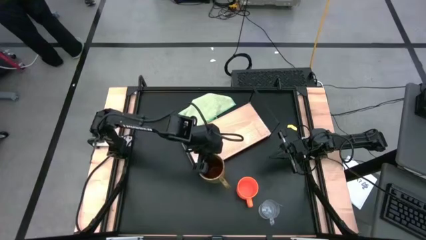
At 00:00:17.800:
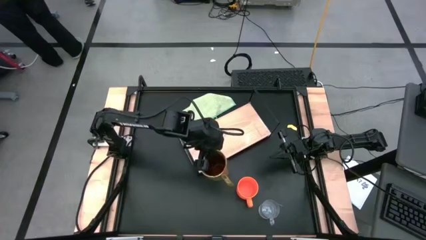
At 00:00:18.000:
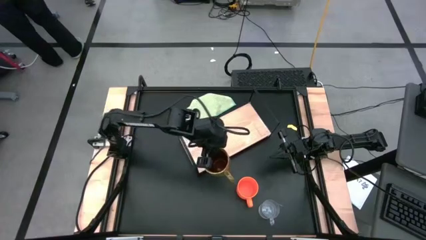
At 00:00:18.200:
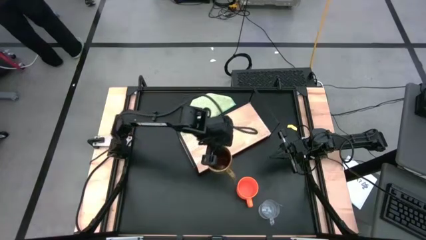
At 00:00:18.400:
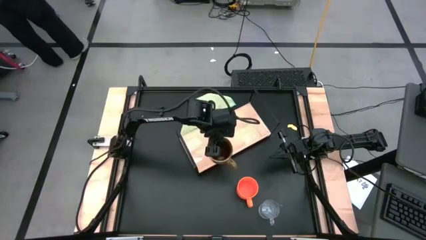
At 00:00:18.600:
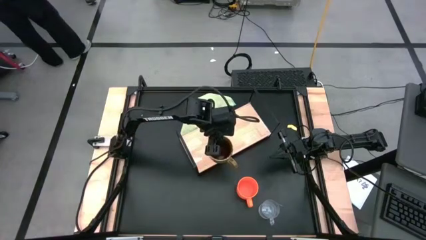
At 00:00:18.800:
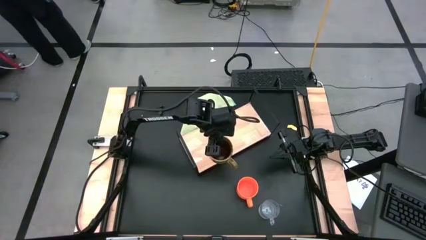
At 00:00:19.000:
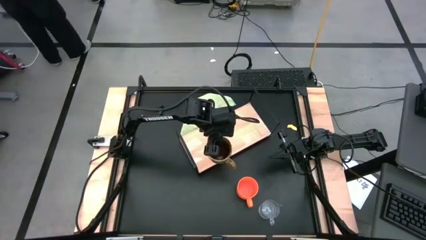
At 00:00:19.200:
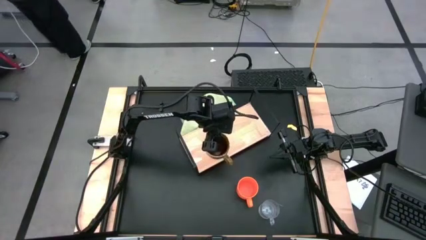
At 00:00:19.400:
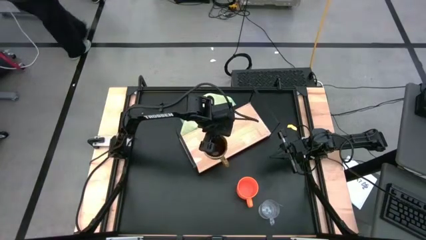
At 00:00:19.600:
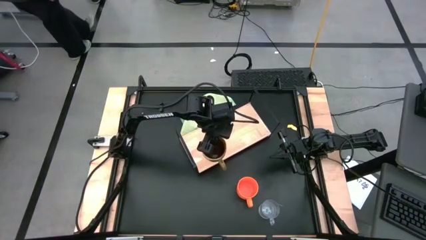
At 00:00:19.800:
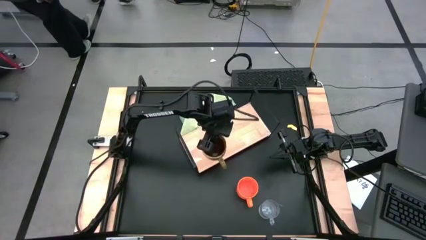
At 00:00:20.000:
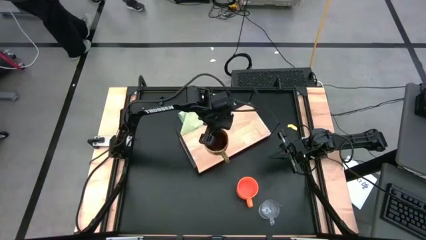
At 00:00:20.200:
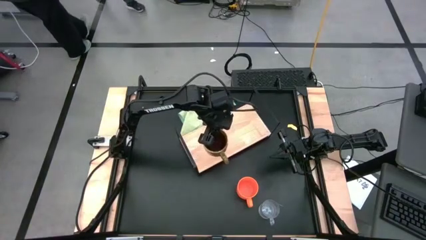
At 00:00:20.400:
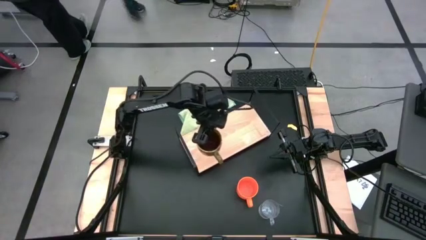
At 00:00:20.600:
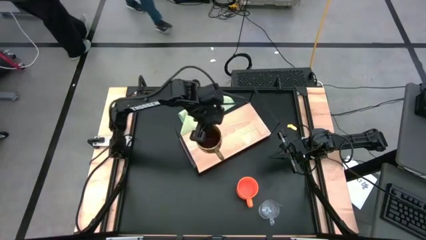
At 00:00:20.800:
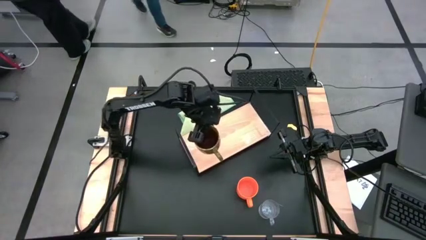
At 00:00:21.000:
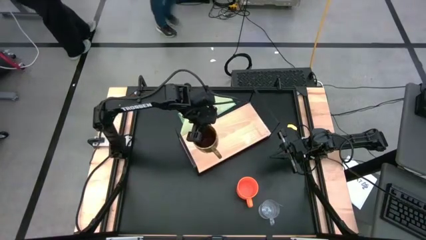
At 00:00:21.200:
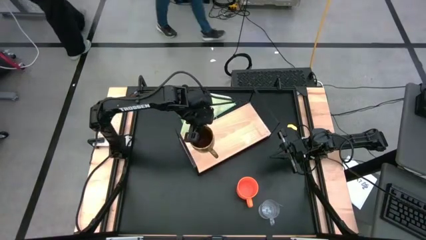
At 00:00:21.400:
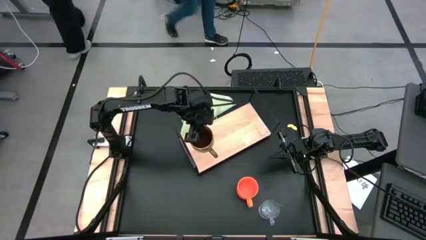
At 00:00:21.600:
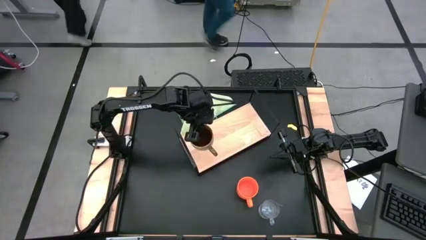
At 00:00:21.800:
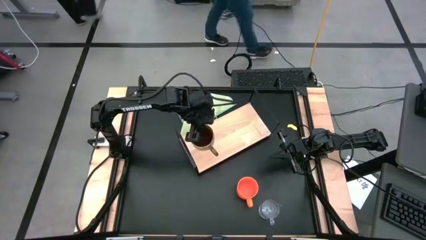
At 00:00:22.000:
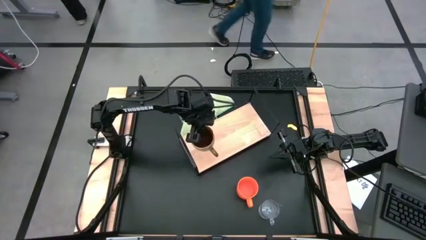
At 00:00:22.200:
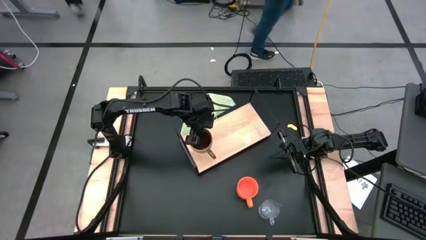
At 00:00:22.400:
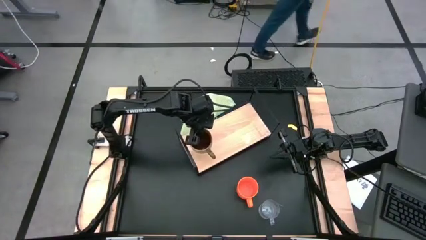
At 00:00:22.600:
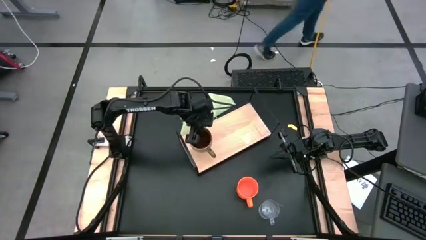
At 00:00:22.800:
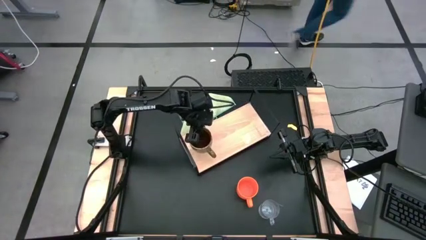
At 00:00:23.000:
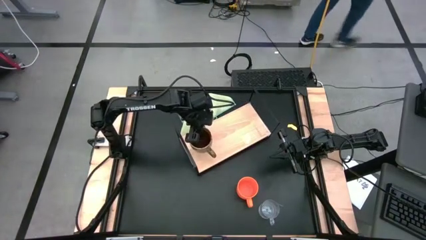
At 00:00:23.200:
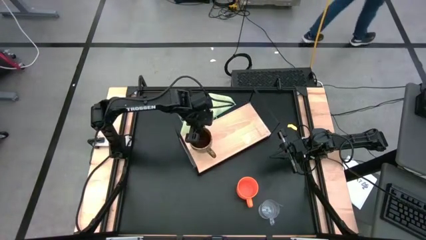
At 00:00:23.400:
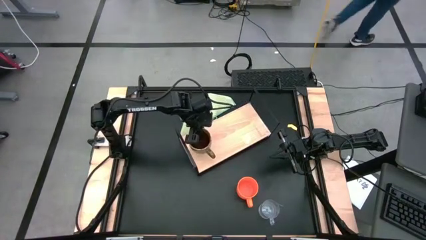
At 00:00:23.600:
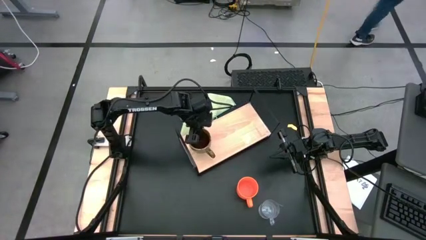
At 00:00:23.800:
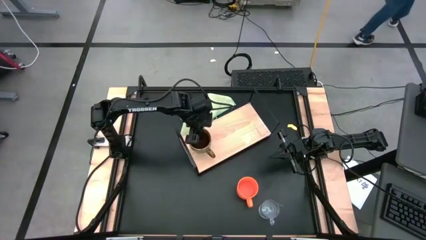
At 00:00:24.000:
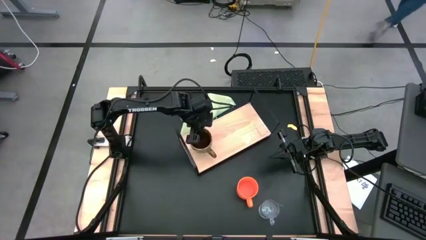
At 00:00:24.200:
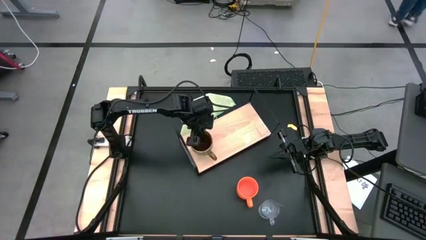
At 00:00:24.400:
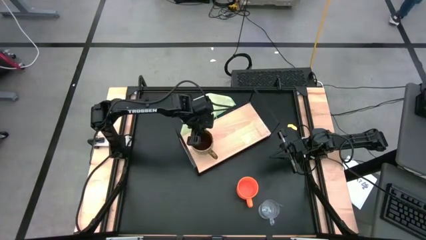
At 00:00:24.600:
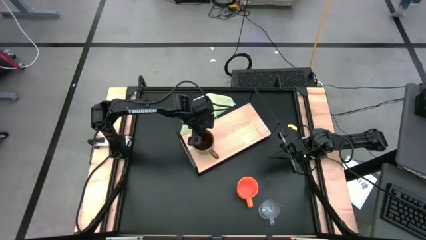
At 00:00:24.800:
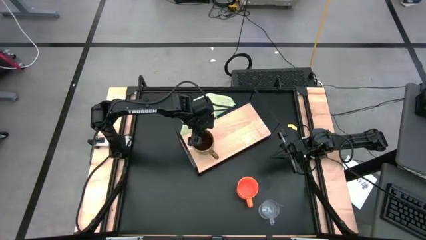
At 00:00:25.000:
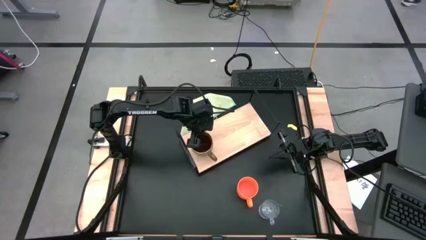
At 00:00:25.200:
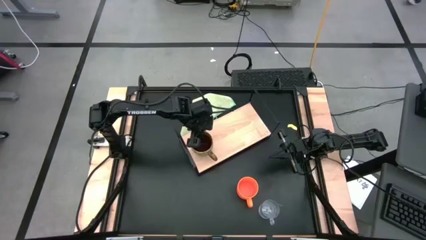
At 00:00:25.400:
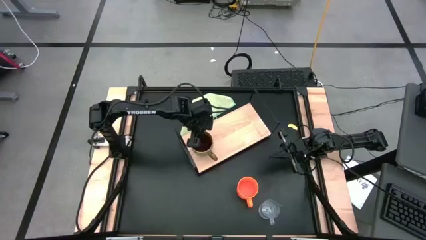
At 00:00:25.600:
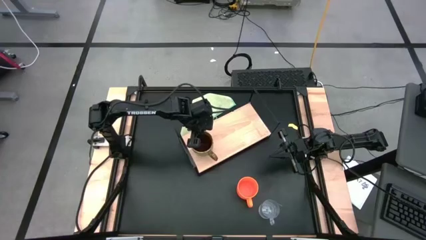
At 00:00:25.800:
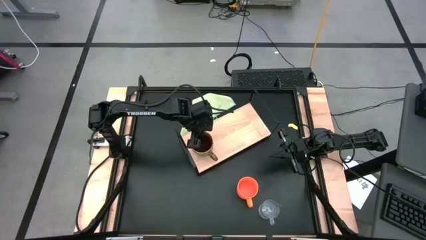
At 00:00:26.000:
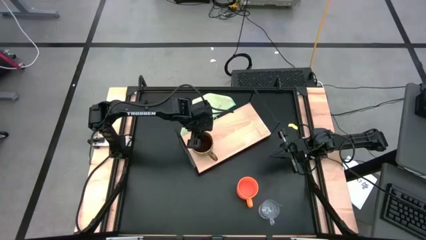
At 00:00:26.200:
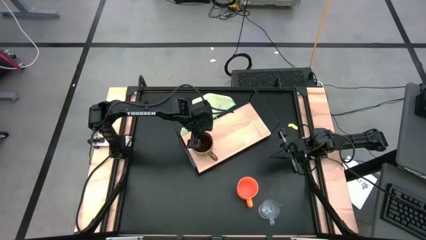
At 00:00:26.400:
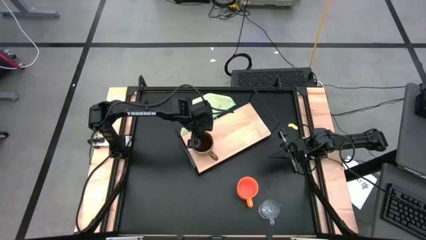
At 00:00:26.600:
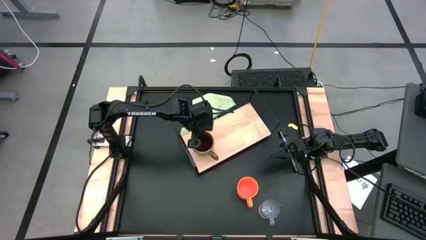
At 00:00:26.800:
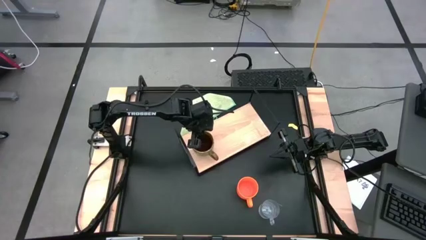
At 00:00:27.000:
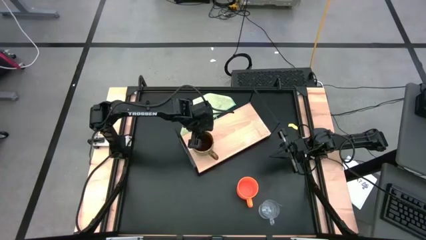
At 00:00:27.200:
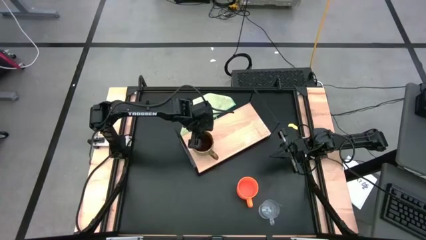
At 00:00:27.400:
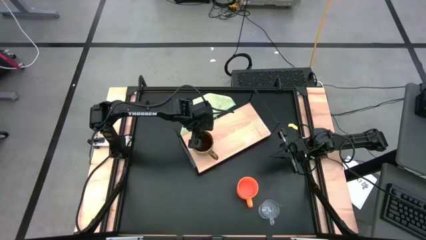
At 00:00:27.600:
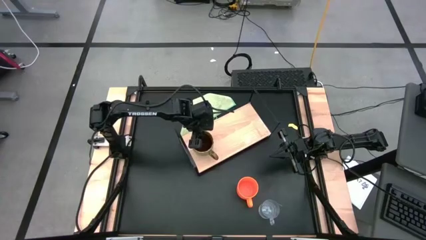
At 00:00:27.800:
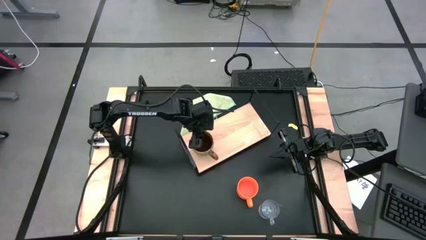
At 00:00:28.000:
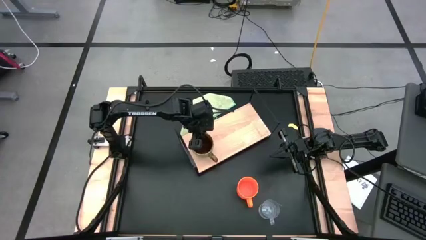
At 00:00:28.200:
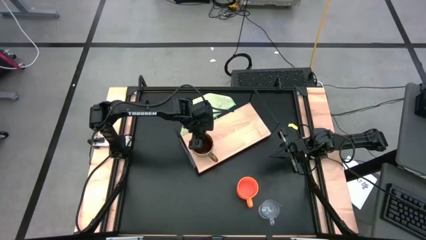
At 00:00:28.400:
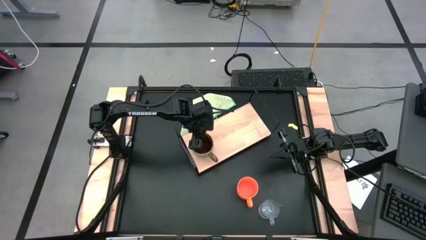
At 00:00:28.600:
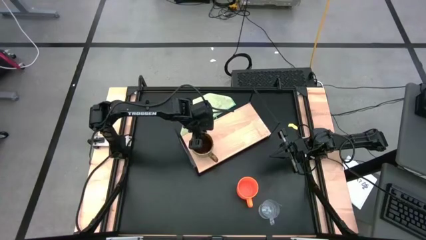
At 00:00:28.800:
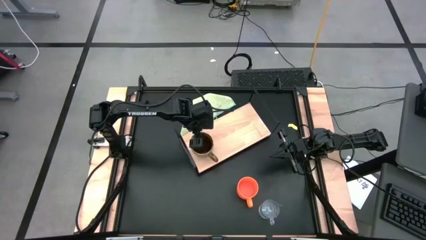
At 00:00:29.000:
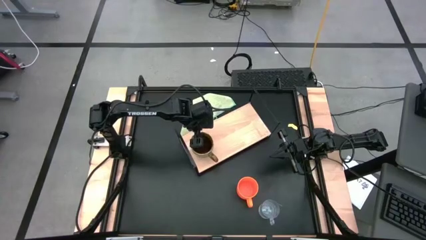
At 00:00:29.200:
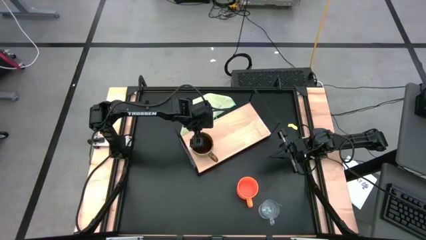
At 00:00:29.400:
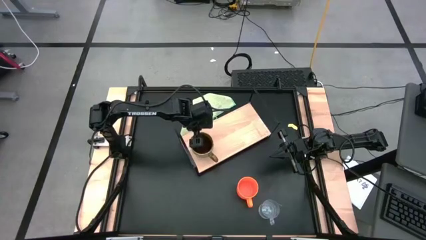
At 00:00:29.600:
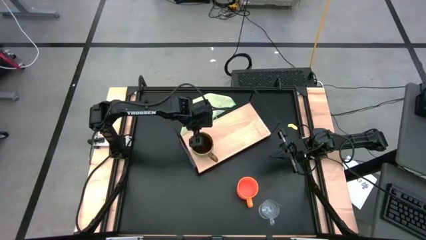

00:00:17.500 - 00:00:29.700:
Task: Stack small to large cups/mugs on shelf
Put the green mug on the shelf

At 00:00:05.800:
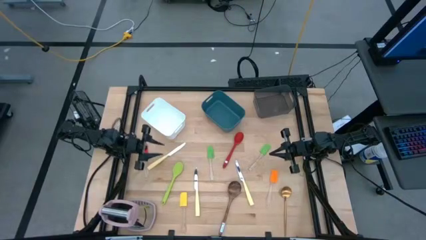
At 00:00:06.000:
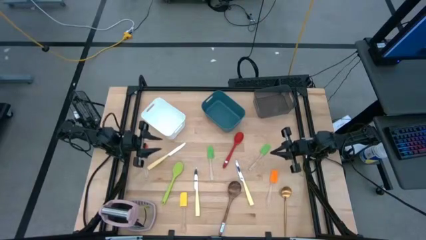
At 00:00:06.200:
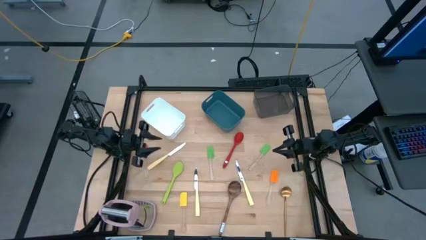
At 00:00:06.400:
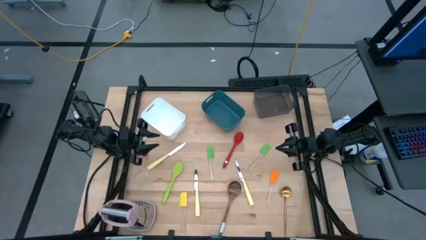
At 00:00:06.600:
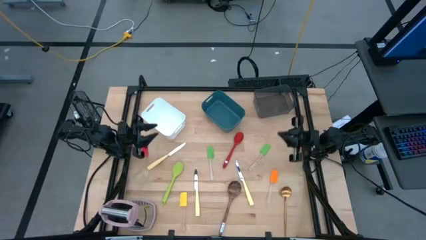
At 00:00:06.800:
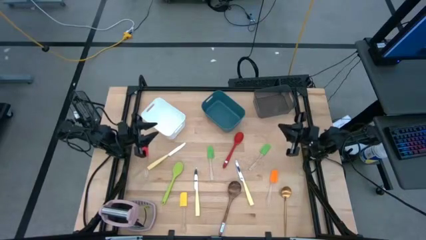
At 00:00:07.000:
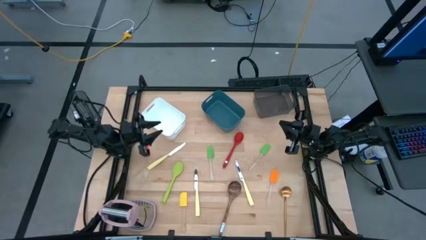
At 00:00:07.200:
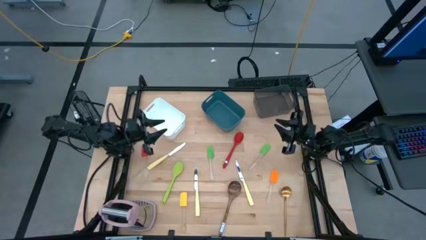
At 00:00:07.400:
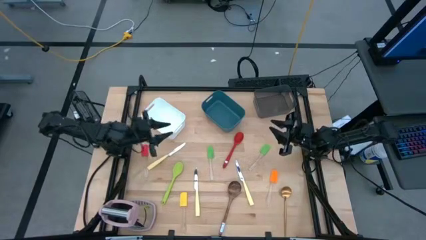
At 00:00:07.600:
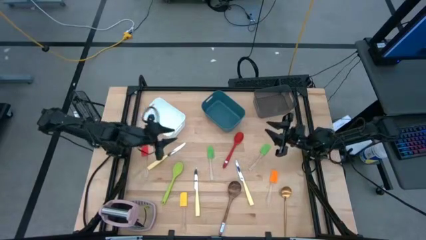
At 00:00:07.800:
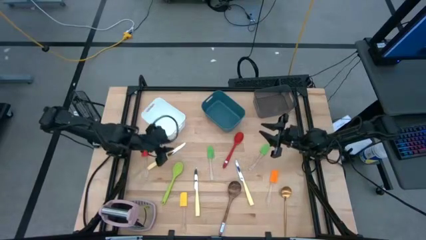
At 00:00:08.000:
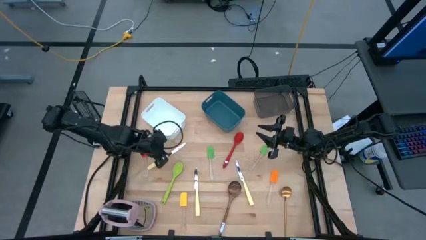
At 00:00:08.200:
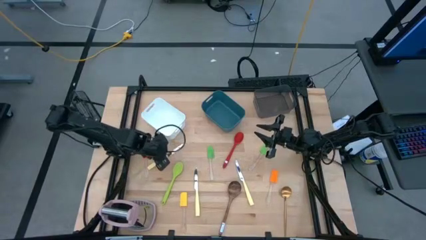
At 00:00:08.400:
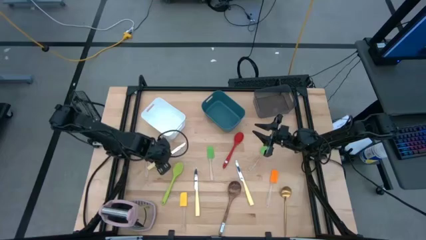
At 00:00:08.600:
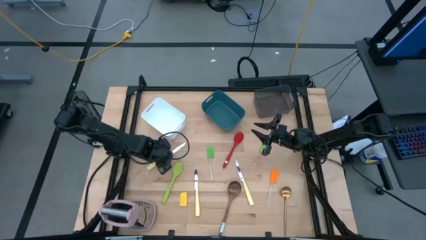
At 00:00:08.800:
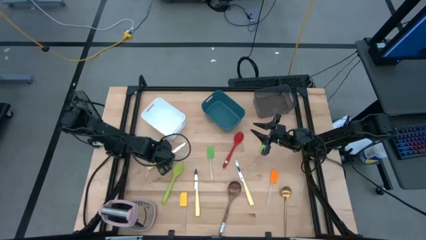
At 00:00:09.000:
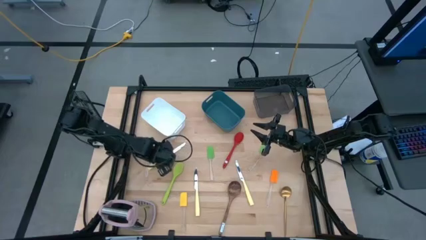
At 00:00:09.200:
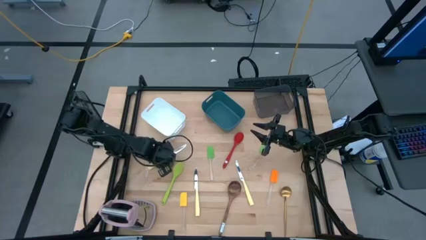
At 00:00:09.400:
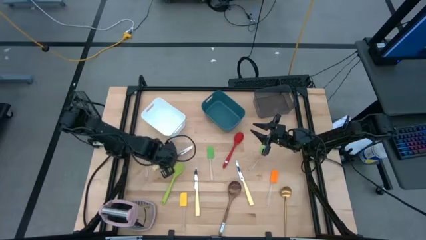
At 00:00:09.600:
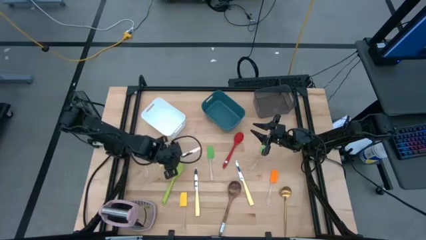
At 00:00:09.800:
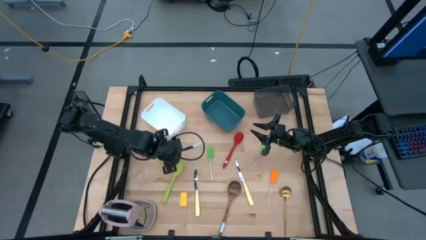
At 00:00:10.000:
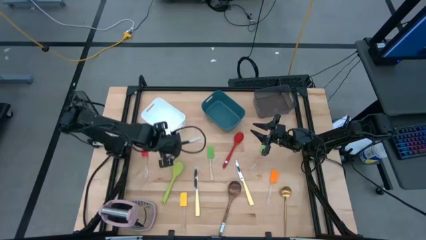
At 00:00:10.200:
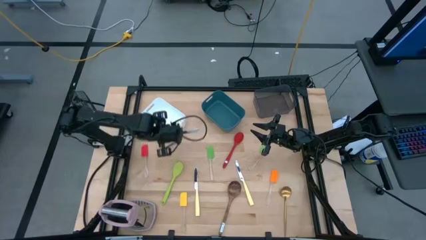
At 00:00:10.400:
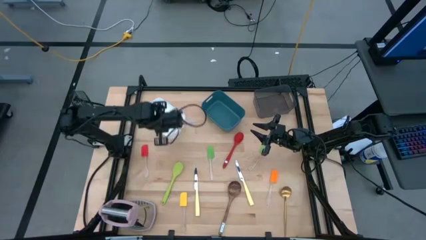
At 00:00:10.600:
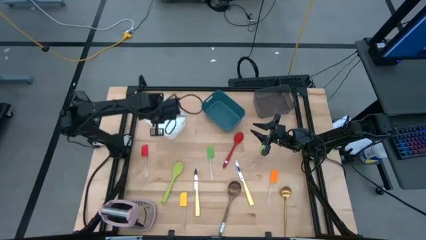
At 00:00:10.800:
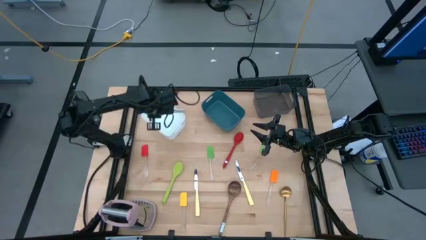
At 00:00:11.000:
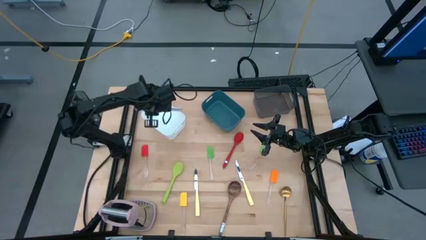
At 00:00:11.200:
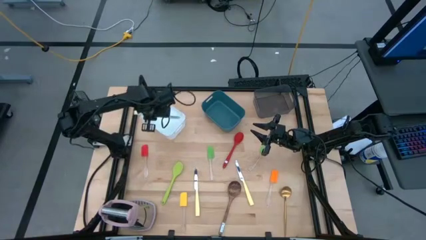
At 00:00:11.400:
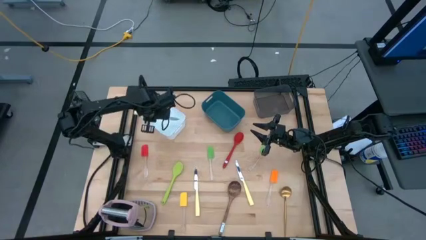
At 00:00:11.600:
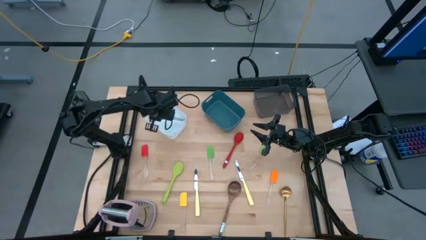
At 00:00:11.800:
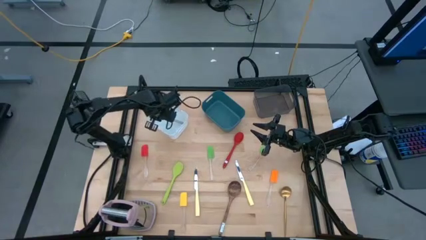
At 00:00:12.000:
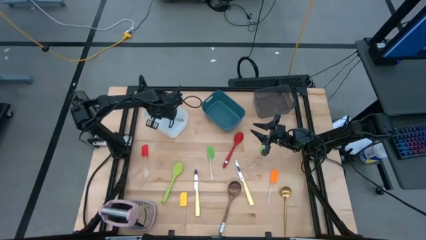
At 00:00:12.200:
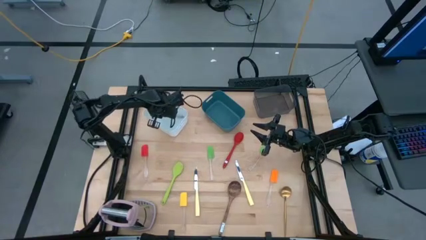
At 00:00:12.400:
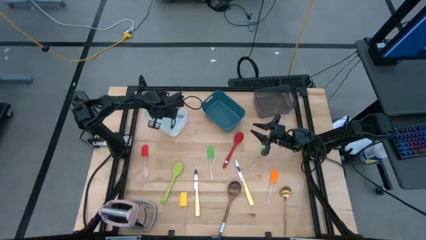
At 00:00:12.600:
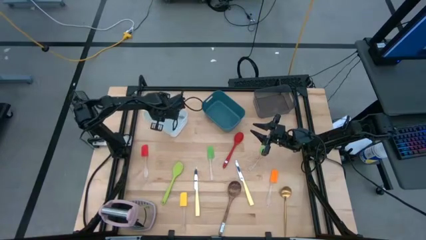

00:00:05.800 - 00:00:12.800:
Task: Pick & Place Kitchen Items
Put the top yellow knife into the white bin
